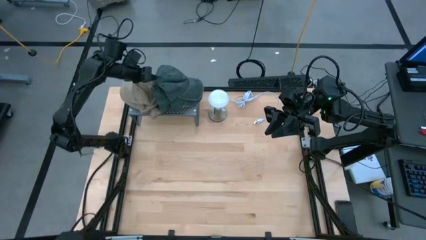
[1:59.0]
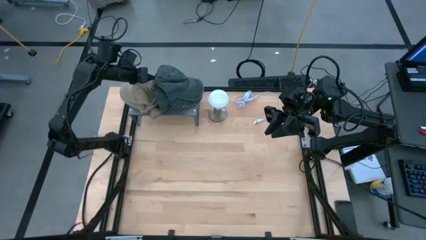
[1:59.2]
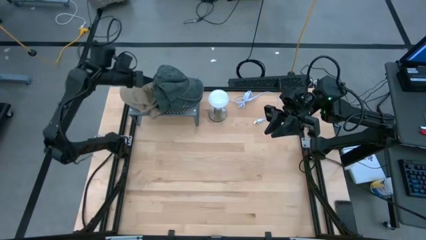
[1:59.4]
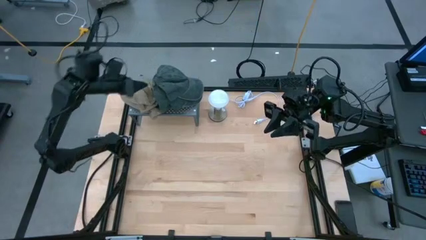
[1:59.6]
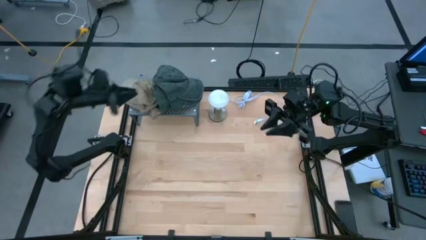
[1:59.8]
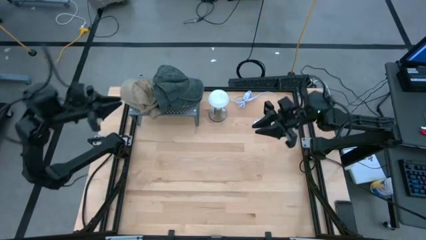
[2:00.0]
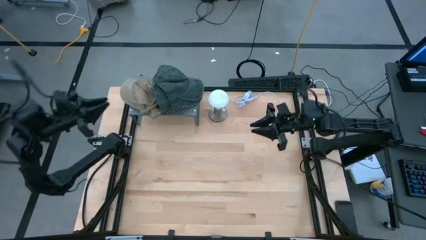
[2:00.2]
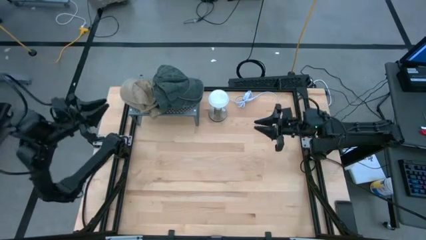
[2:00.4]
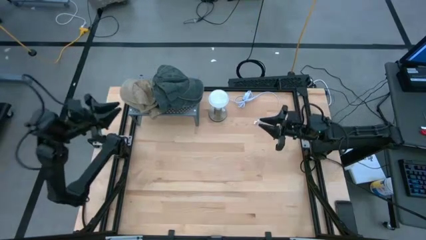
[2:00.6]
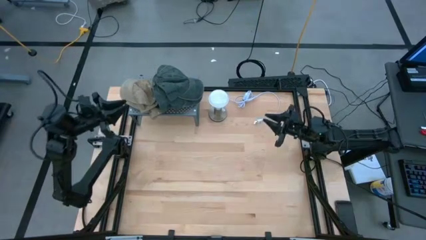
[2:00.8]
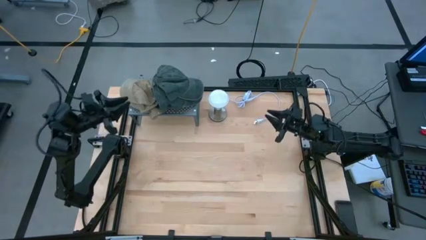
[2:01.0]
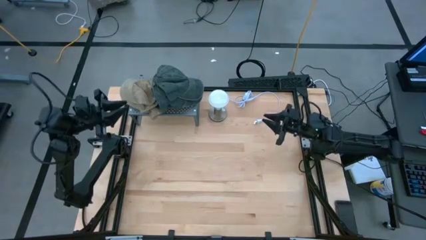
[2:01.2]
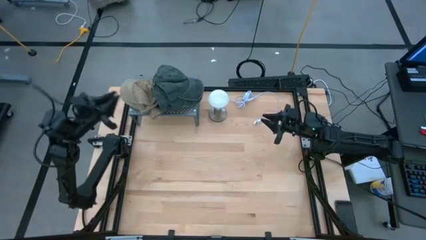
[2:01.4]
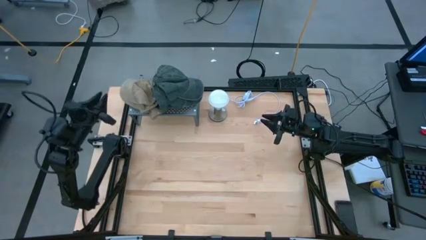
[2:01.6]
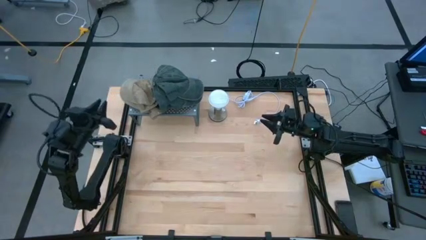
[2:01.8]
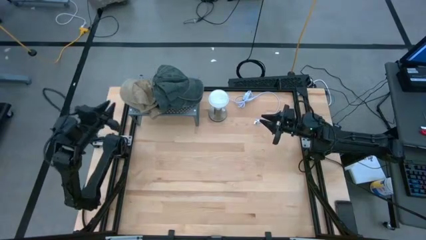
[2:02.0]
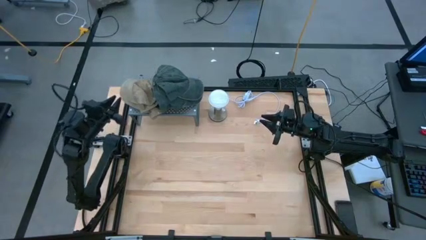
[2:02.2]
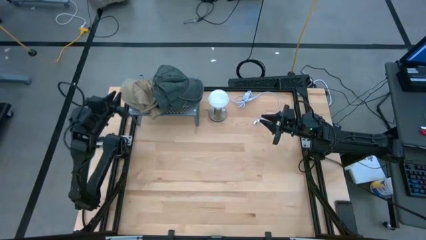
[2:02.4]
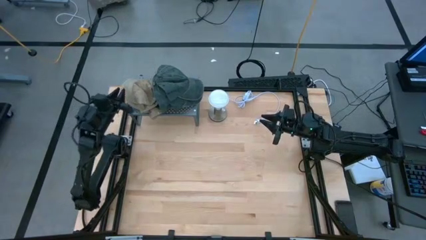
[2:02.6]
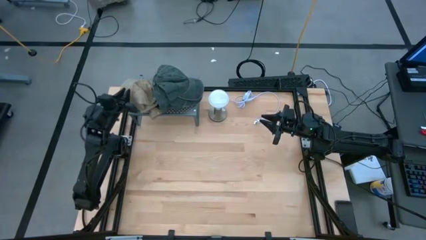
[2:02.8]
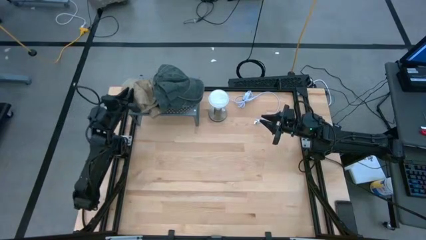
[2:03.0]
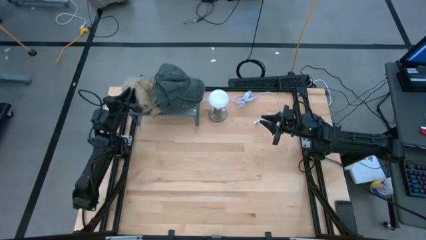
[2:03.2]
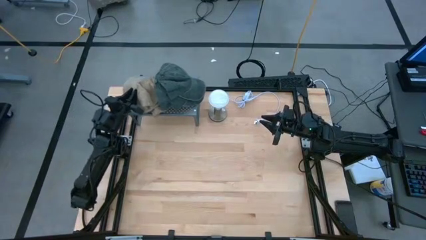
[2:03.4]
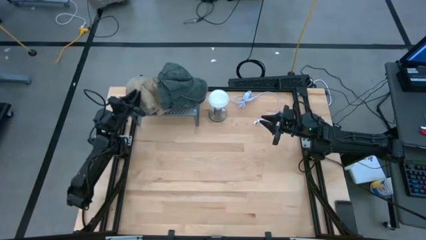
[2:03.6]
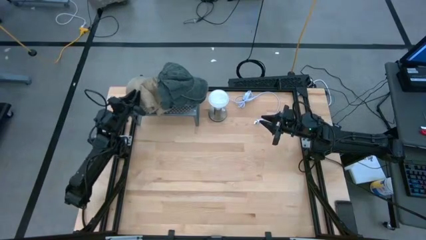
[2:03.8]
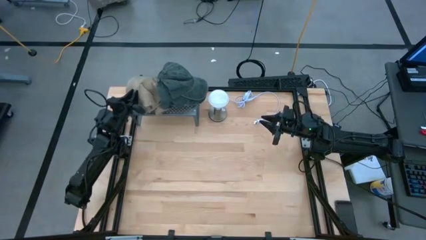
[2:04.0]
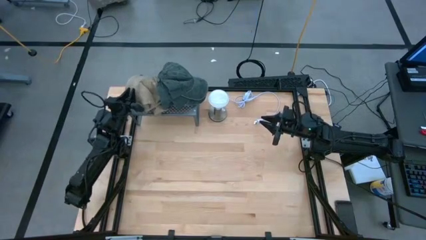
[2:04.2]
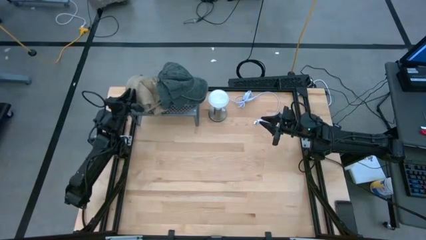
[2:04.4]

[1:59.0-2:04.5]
Task: Pick & Place hat
Adjust the stacked brown caps on the shelf

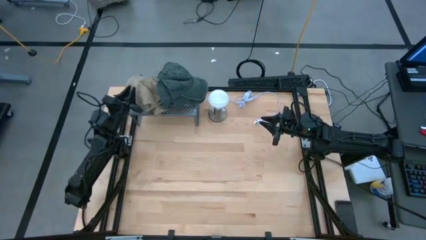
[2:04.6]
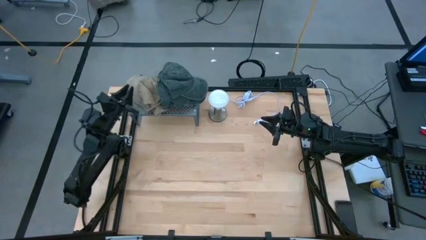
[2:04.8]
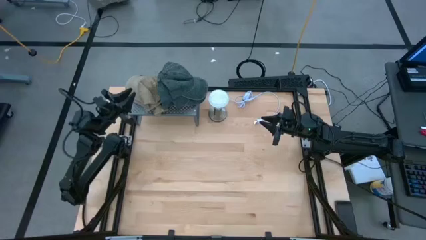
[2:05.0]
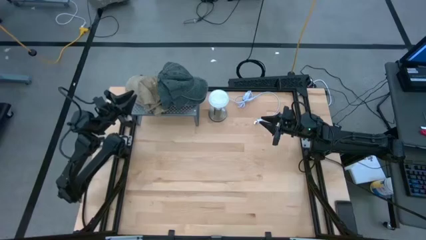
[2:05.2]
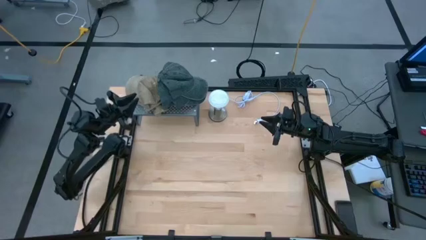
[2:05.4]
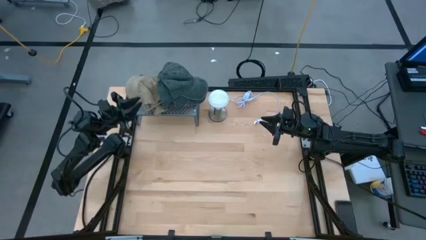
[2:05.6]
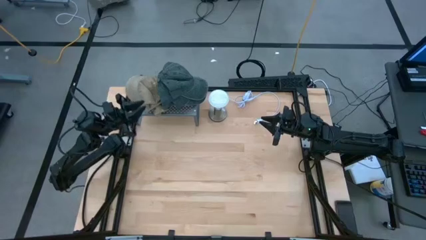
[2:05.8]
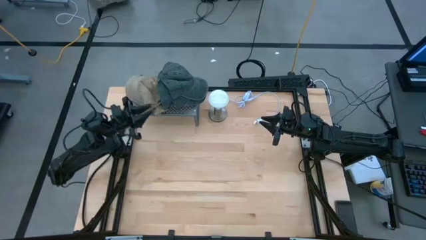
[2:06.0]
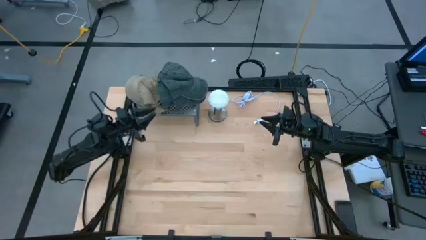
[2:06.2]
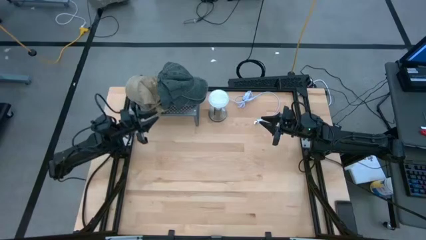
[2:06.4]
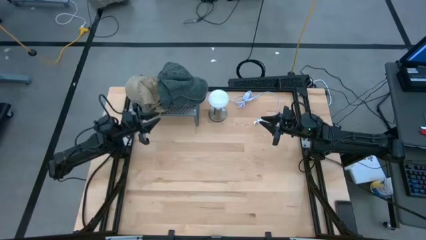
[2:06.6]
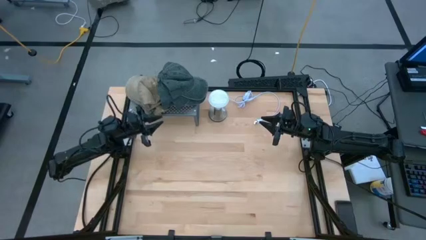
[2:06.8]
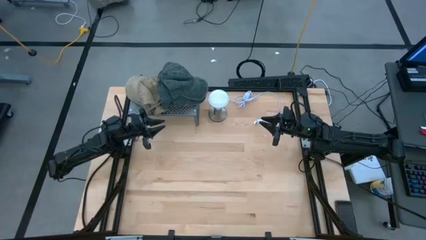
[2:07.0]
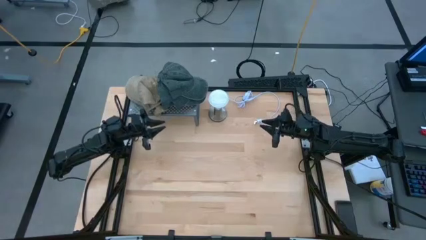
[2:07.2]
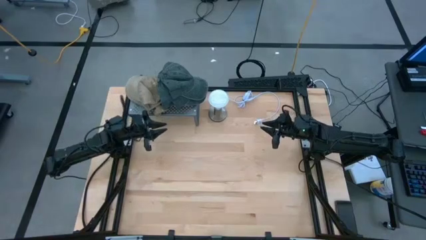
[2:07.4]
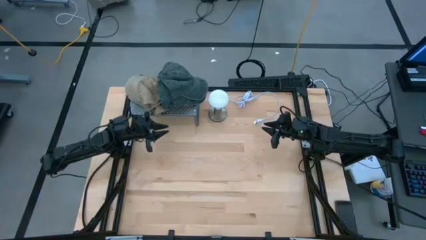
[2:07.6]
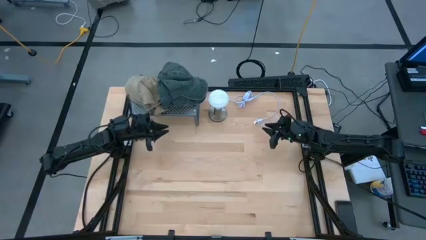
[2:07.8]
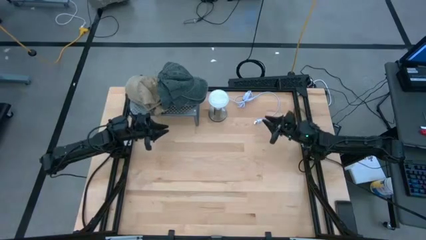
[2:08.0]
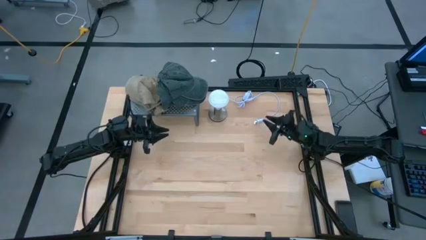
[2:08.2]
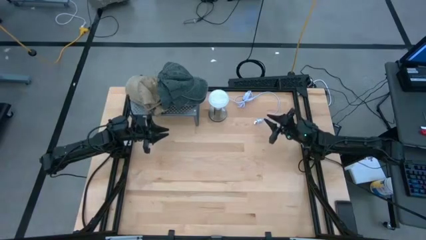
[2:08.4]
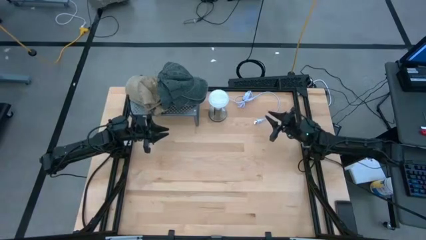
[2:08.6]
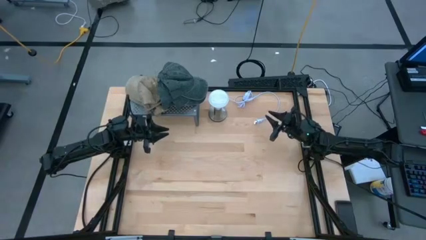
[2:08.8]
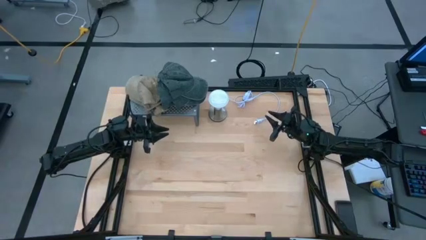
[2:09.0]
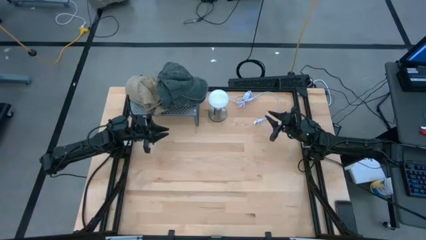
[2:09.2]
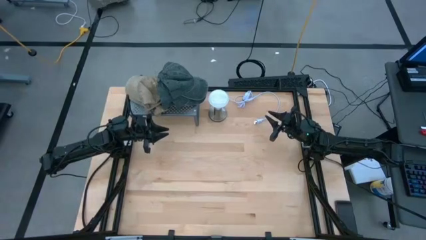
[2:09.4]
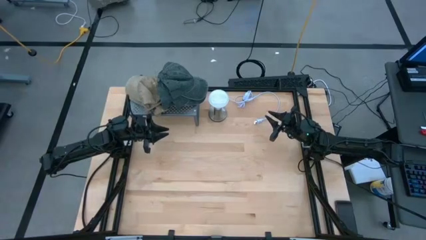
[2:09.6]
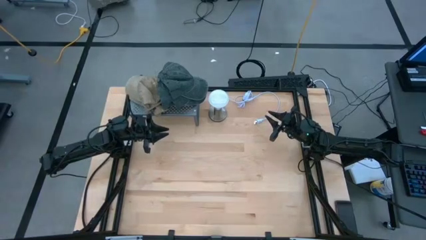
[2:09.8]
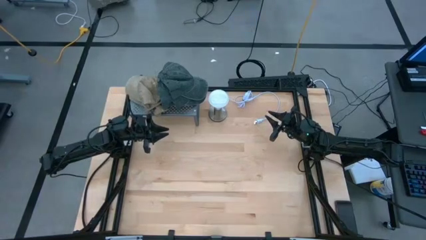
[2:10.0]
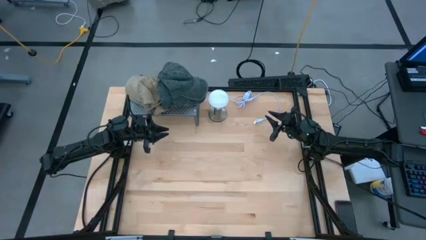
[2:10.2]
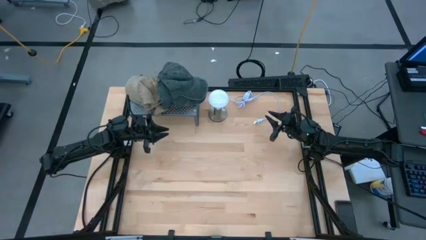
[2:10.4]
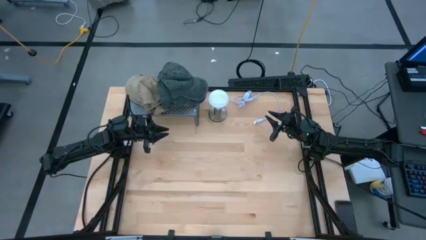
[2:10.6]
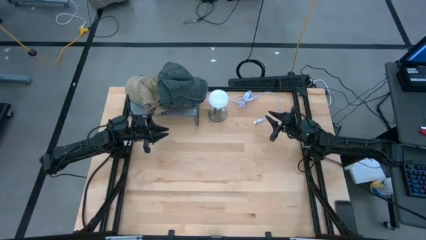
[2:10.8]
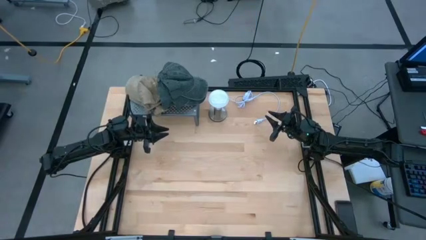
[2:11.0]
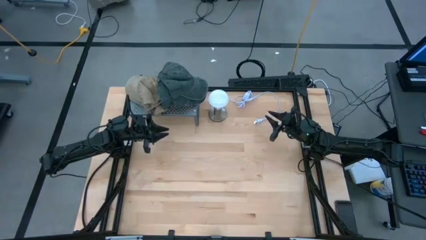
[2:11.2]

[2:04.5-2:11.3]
Return to Home Position

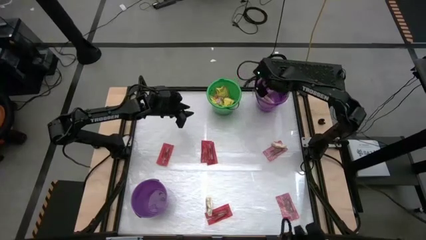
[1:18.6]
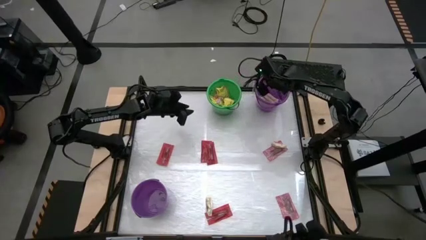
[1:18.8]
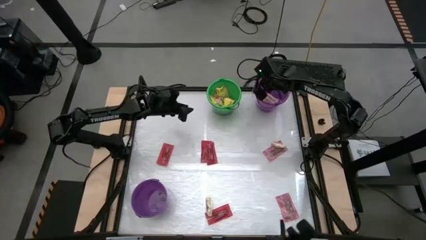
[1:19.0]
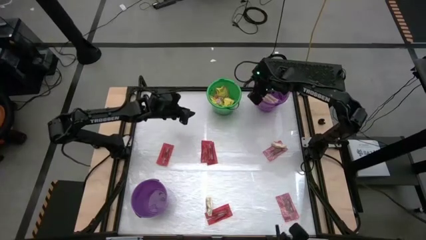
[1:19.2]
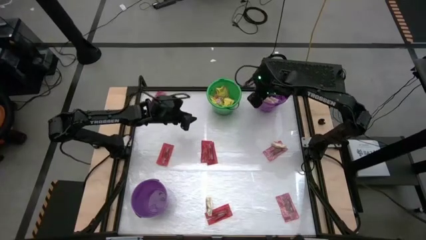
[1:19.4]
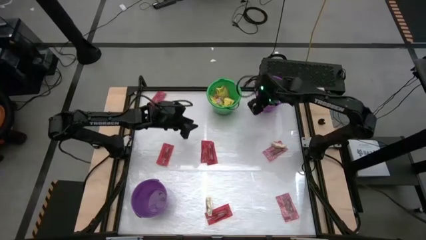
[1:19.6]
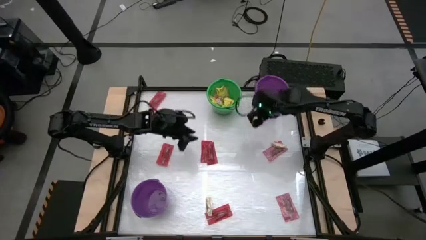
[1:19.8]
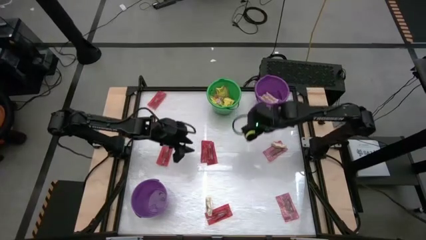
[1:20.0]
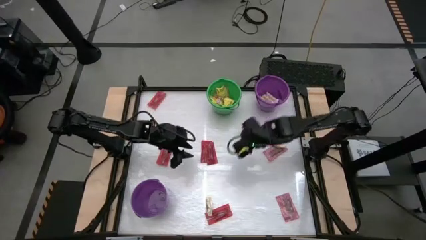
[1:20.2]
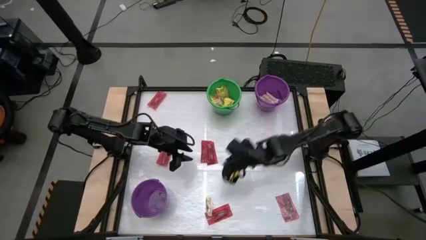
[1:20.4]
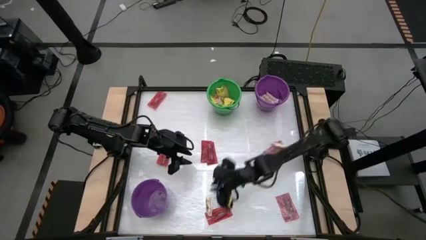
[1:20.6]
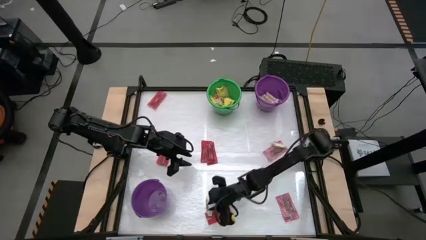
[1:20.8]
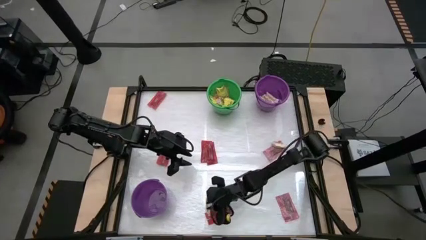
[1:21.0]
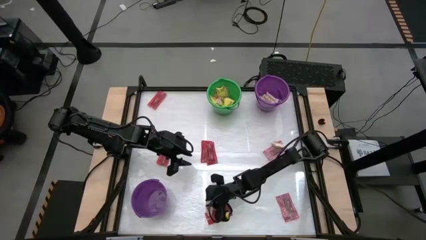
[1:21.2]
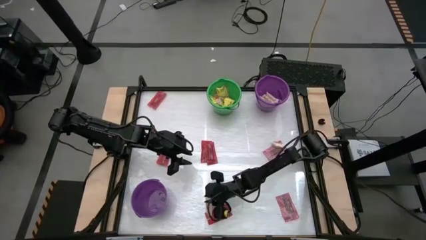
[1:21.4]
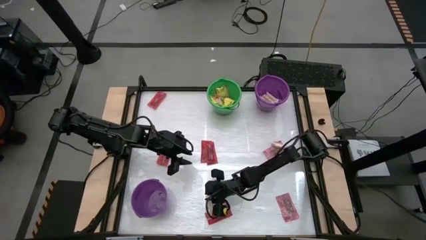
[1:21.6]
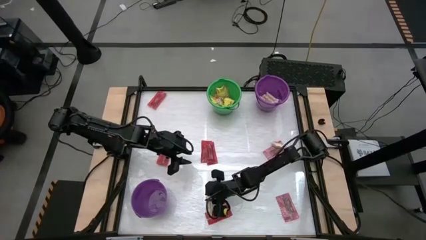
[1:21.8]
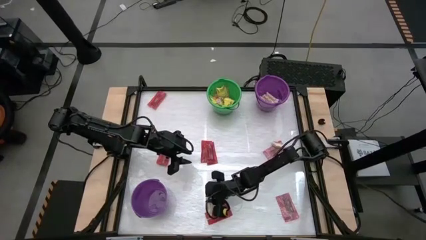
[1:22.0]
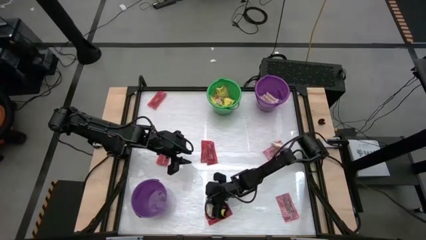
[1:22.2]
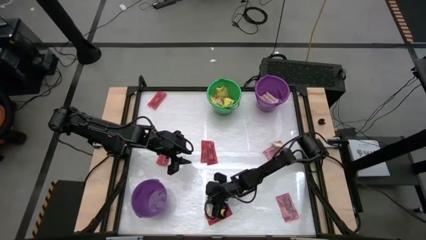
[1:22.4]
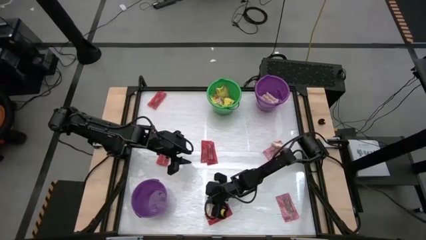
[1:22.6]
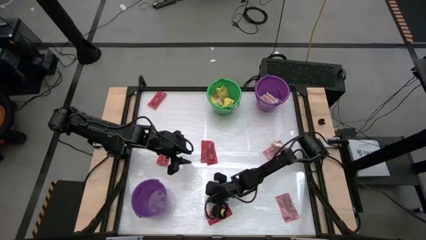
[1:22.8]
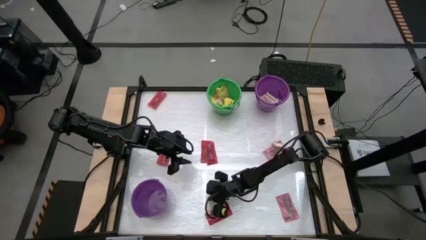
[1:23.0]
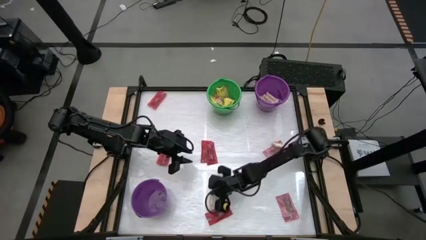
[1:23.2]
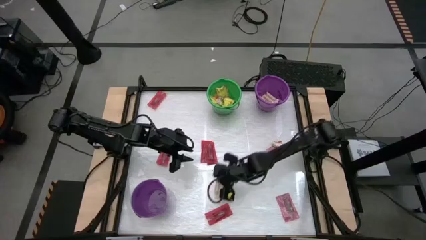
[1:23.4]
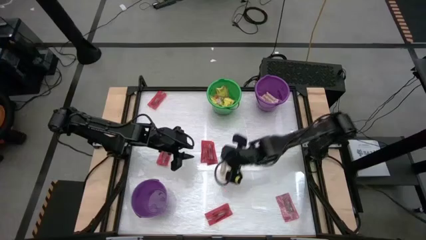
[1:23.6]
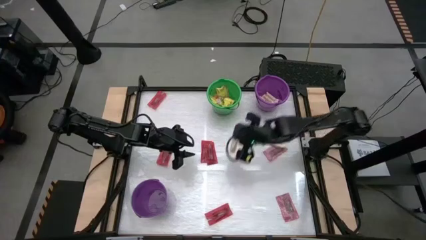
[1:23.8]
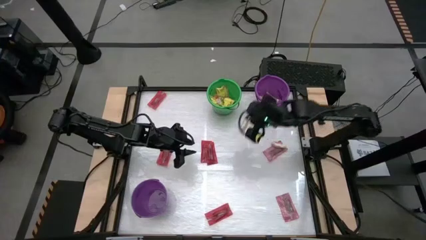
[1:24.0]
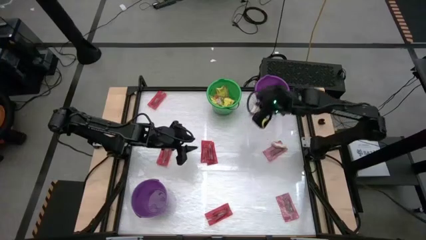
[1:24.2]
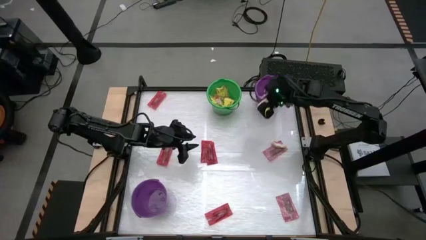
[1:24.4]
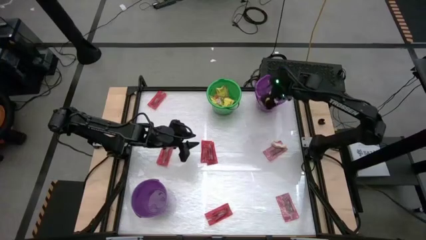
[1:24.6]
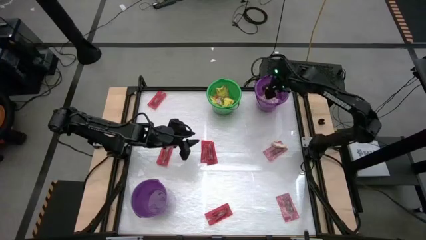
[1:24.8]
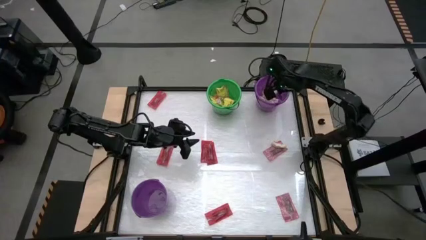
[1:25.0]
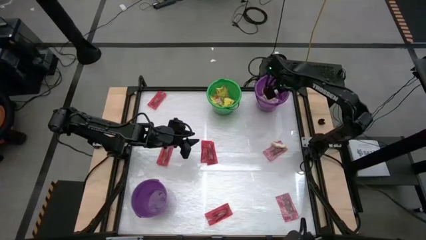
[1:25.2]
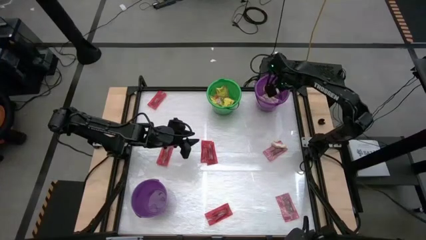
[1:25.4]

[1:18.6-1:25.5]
Task: Sort candy by brand, put in halloween buckets
Put the light brown chocolate bar into the top violet bucket
